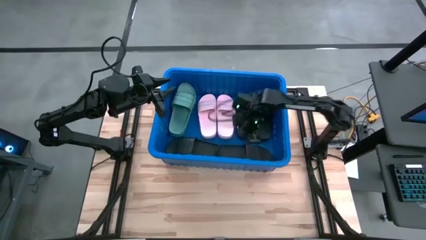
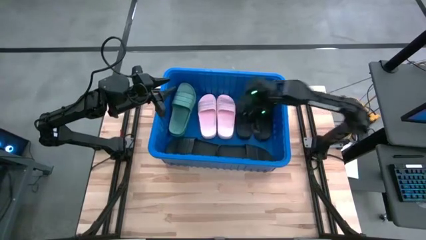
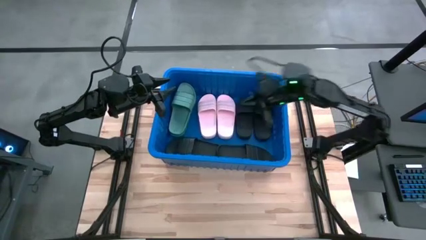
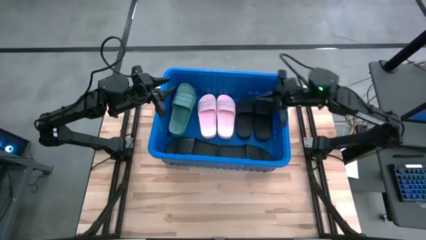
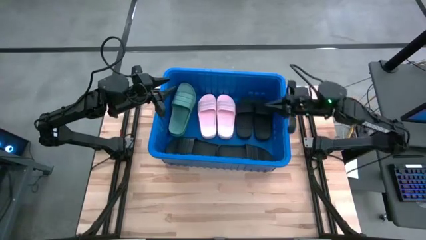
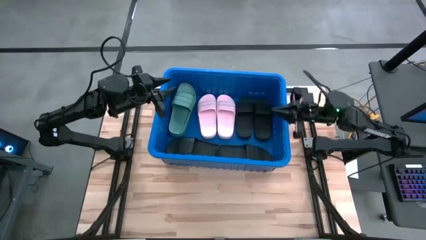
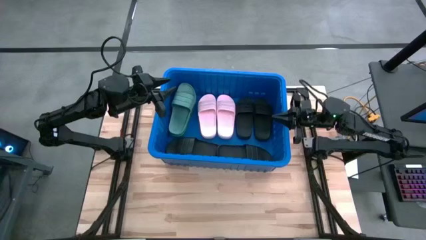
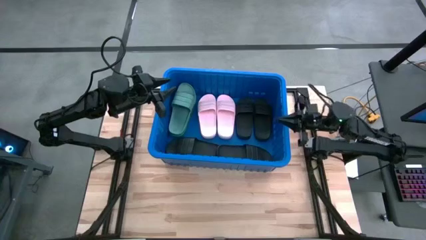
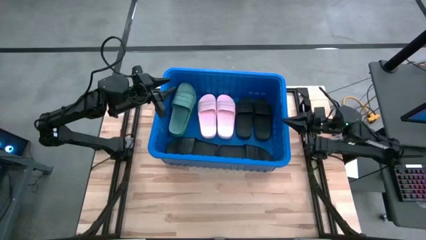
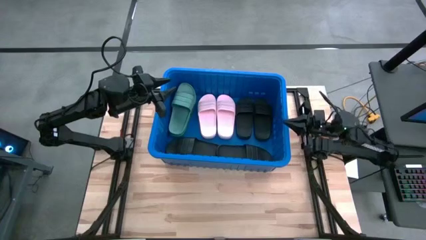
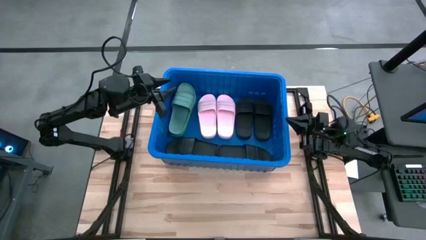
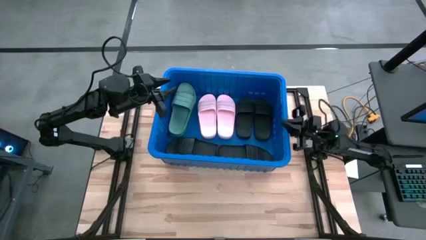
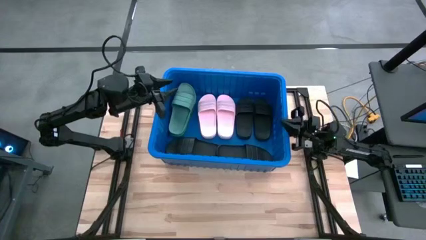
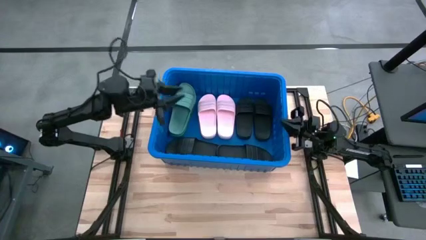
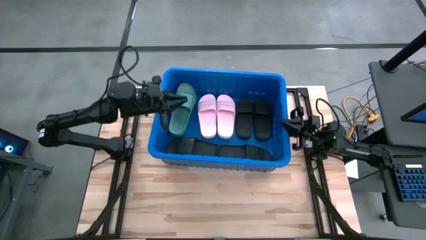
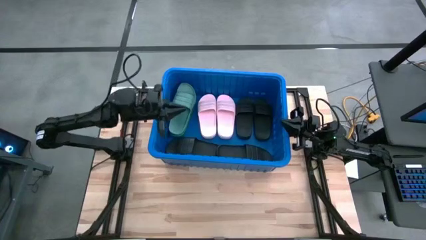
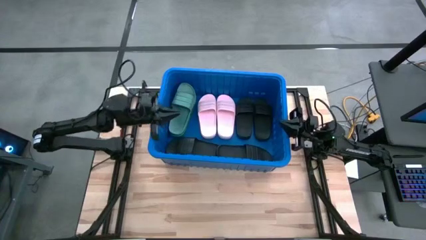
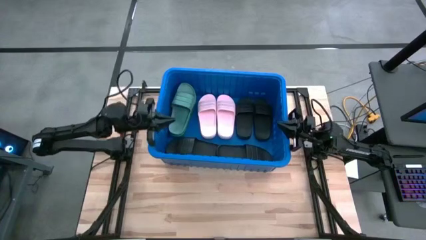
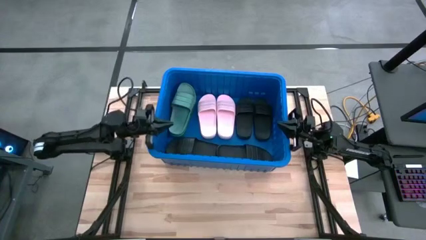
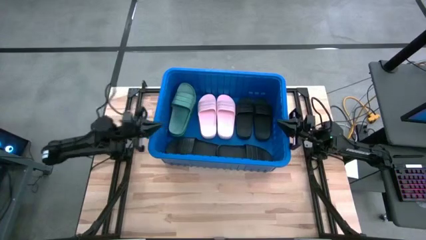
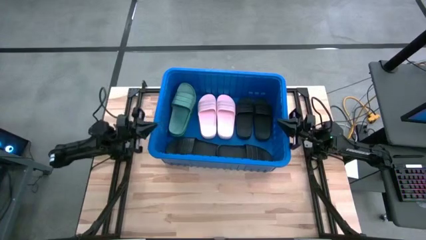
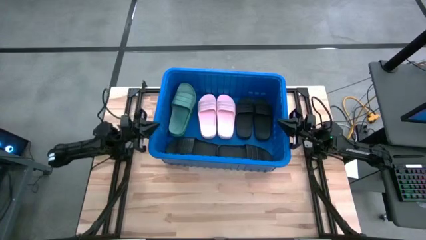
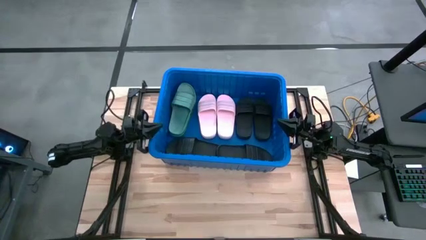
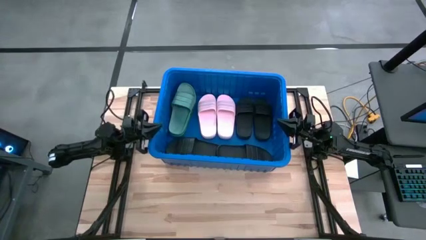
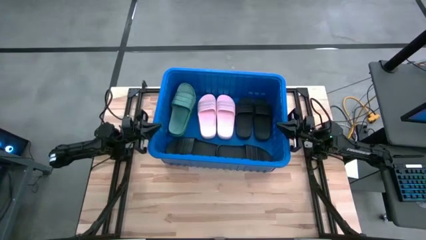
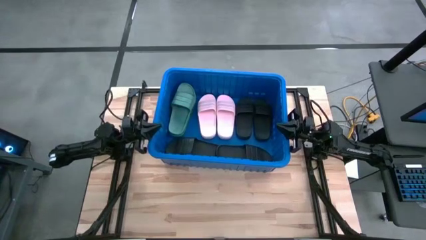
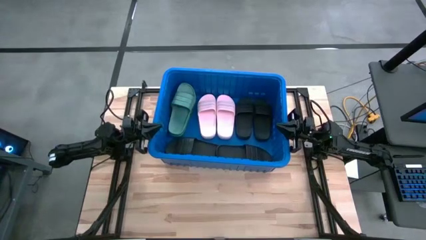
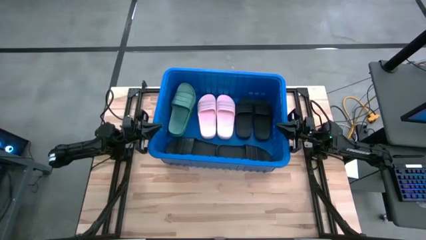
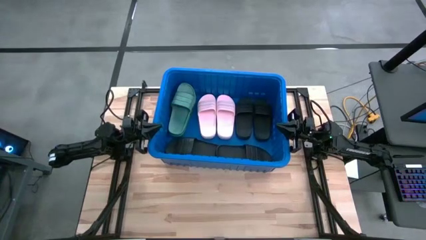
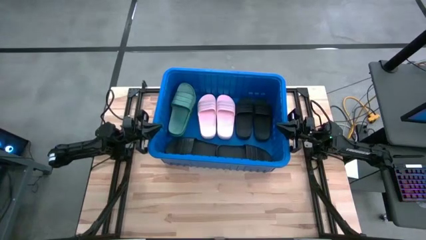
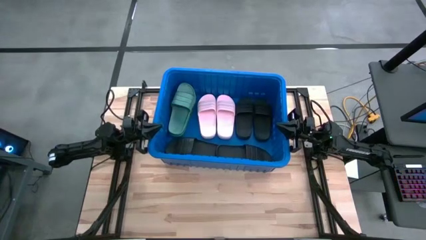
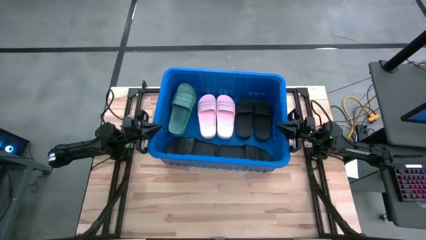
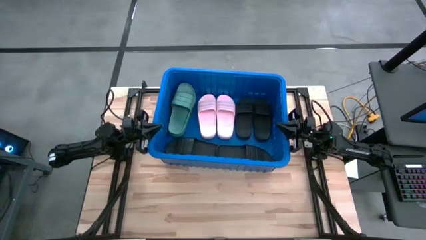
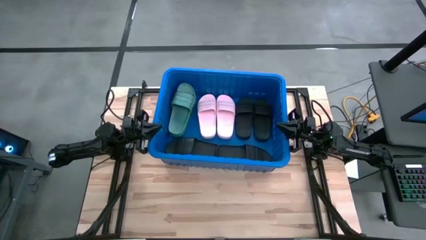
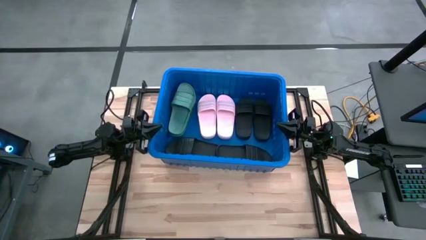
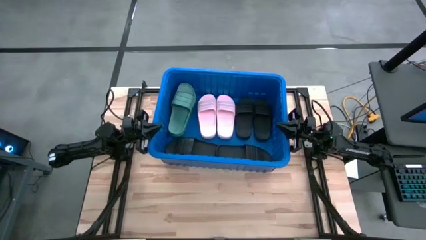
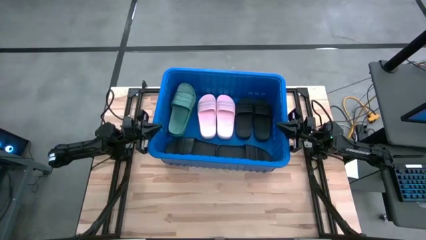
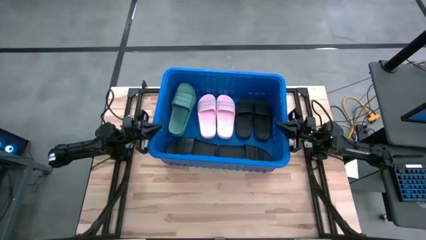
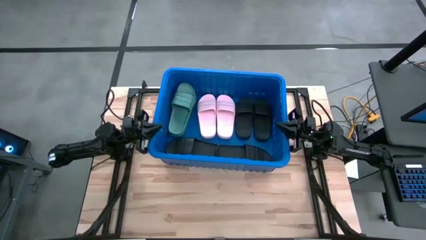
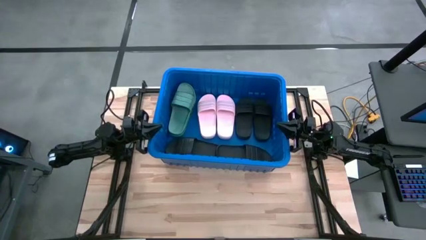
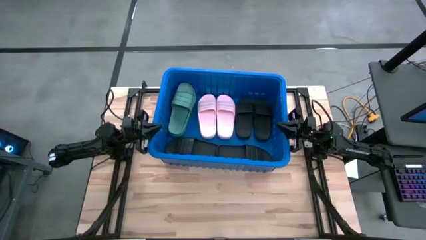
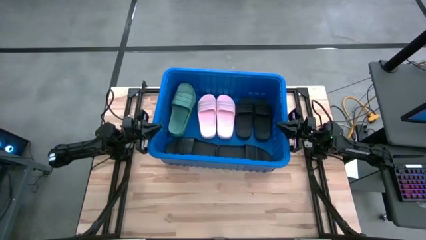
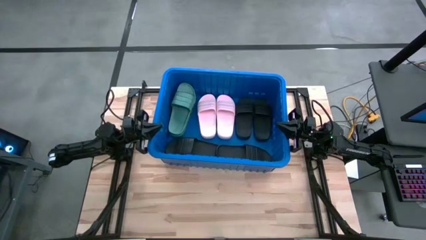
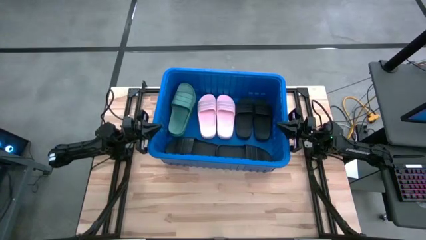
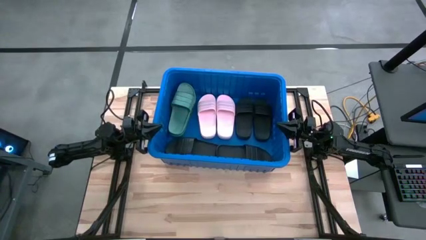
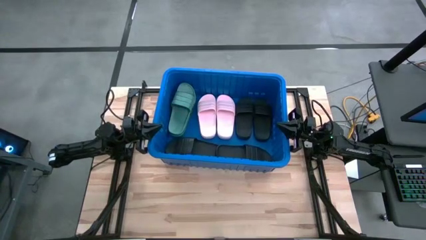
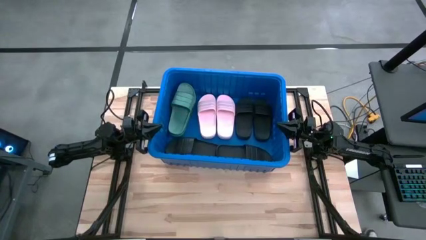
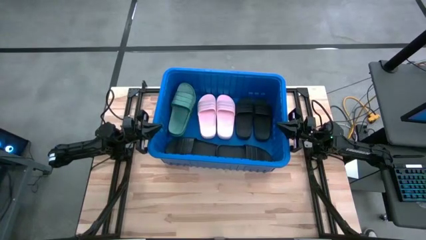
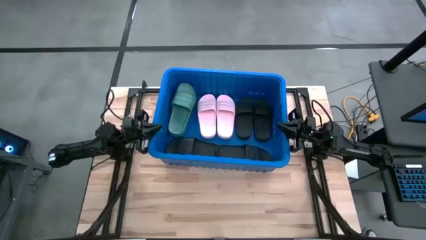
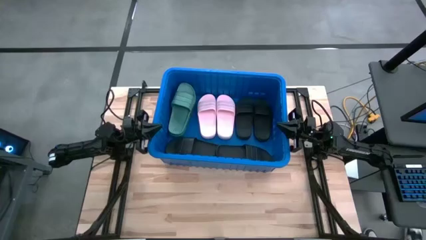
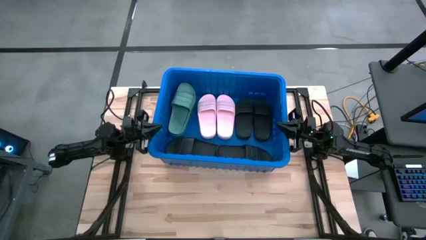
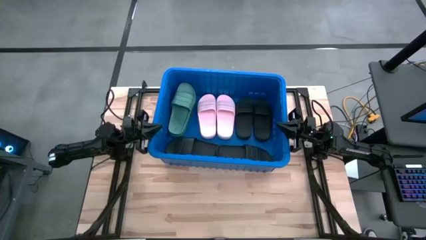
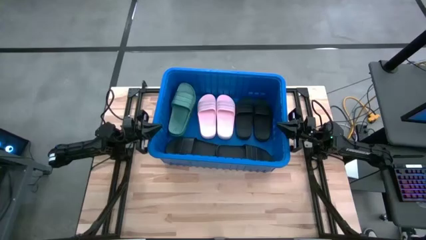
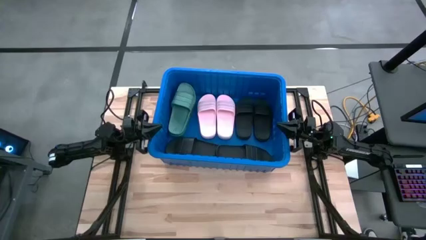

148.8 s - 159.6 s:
Task: Pick and place slides into bin
Return to Home Position
